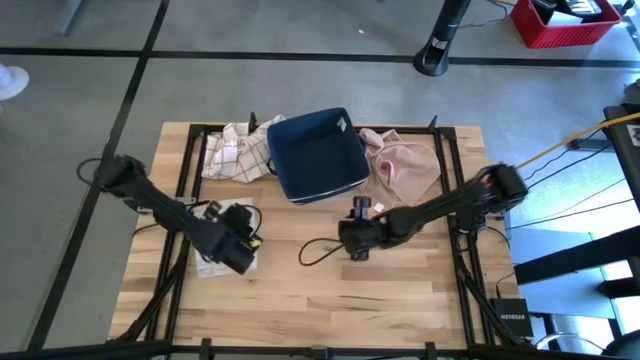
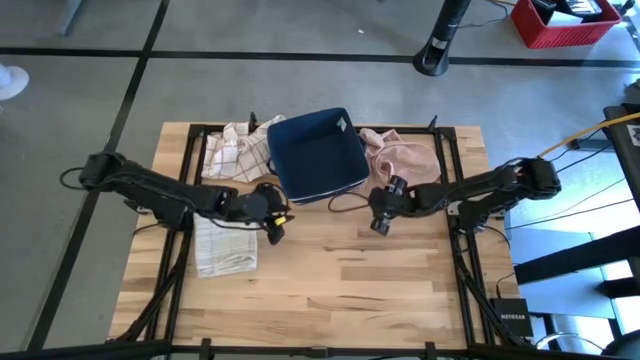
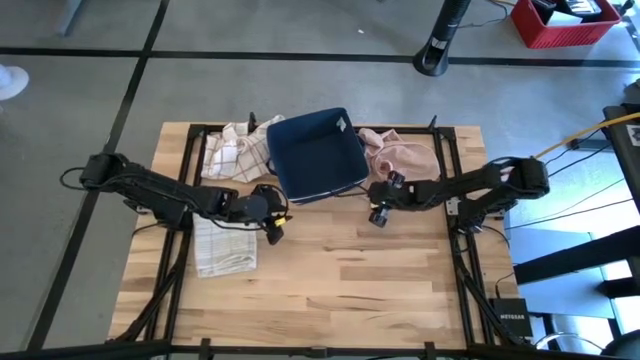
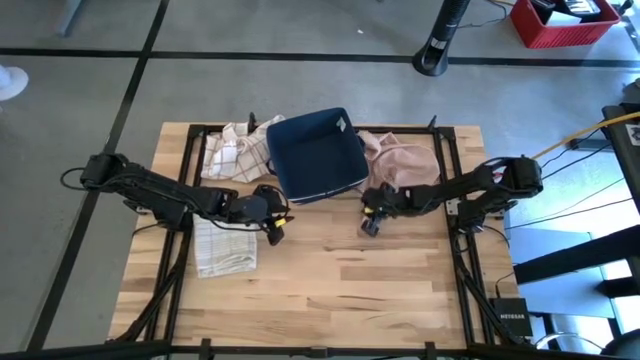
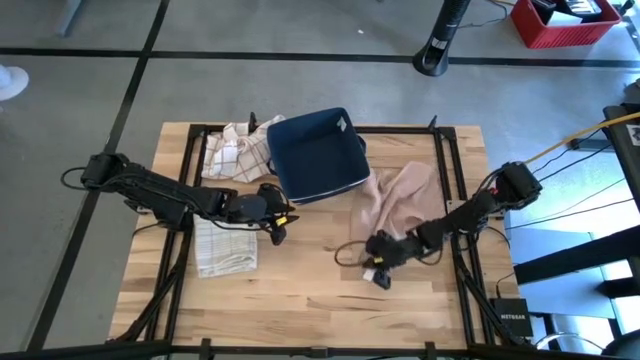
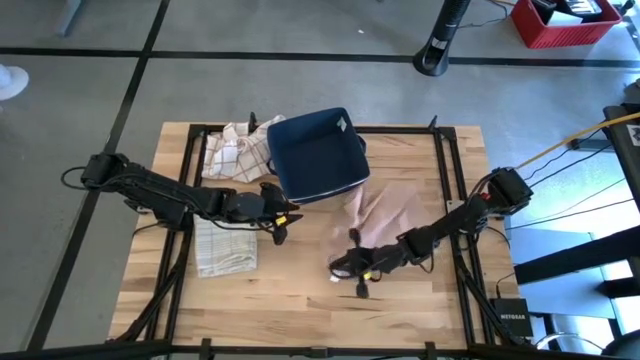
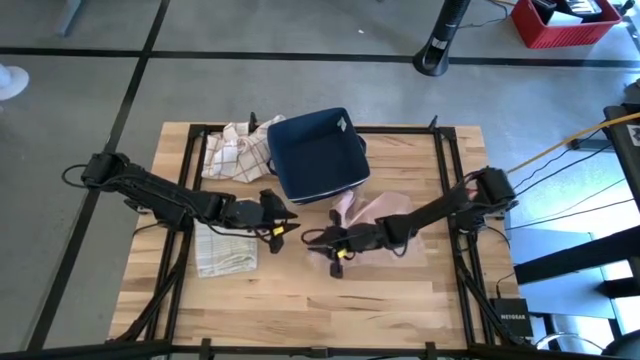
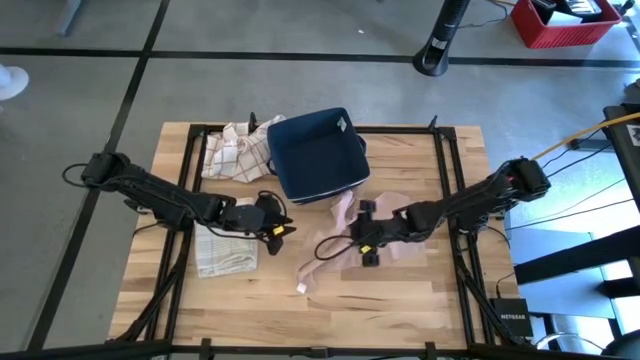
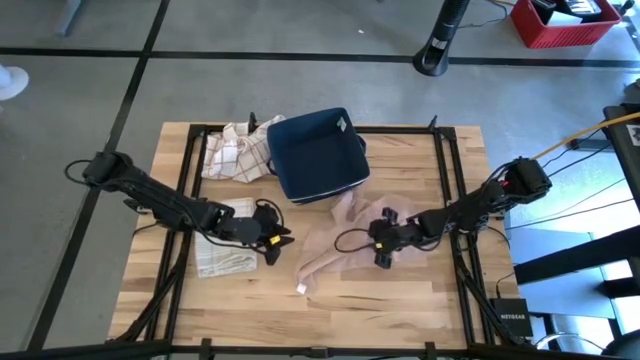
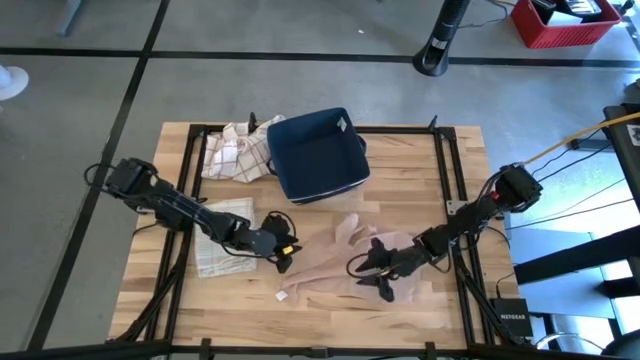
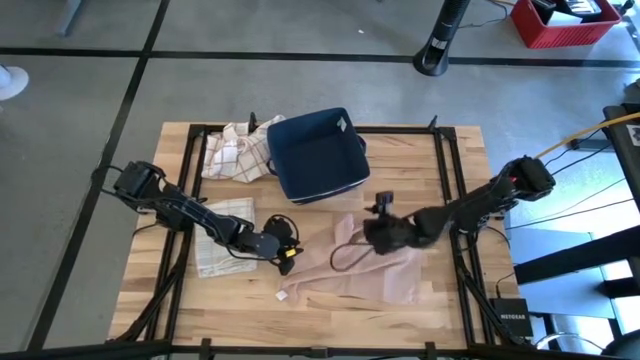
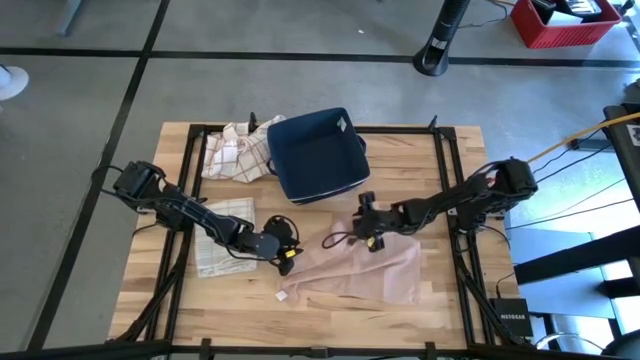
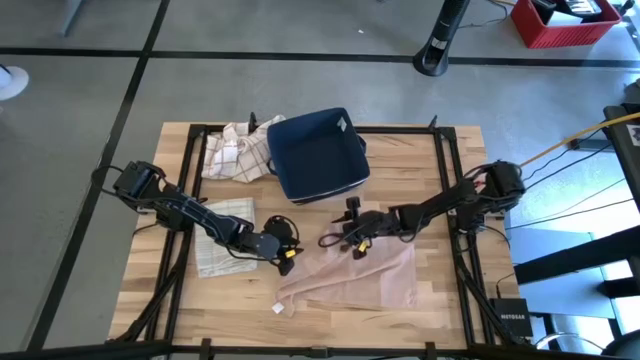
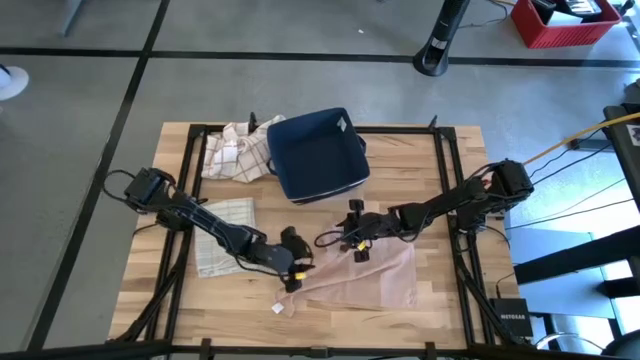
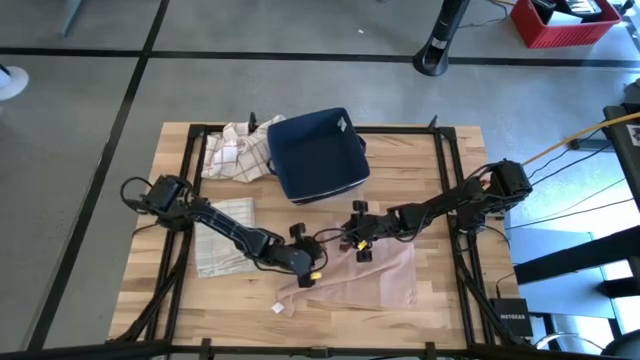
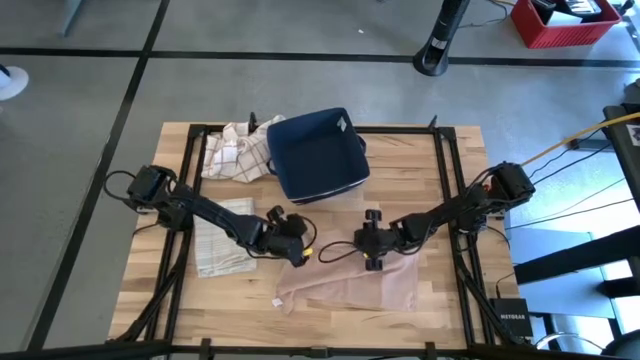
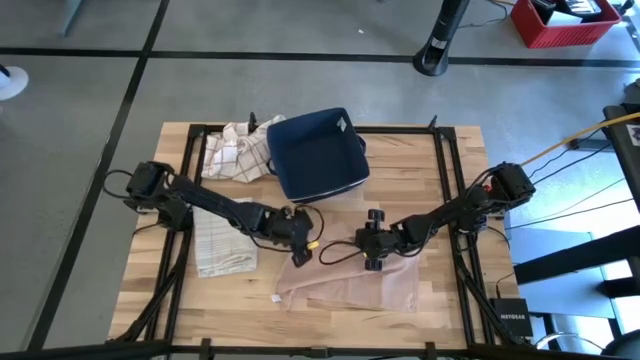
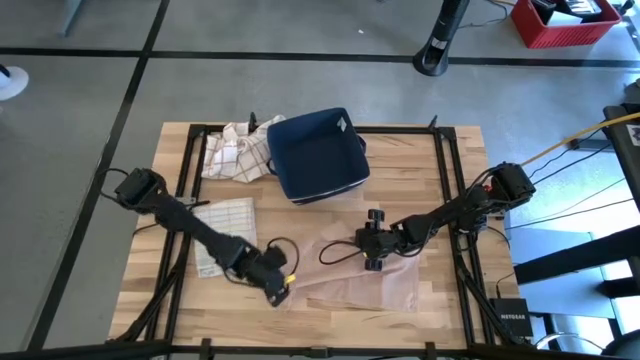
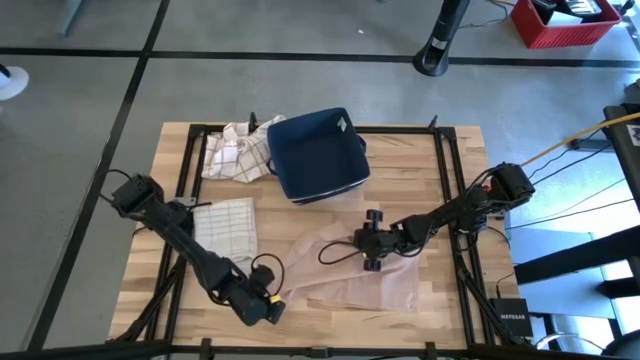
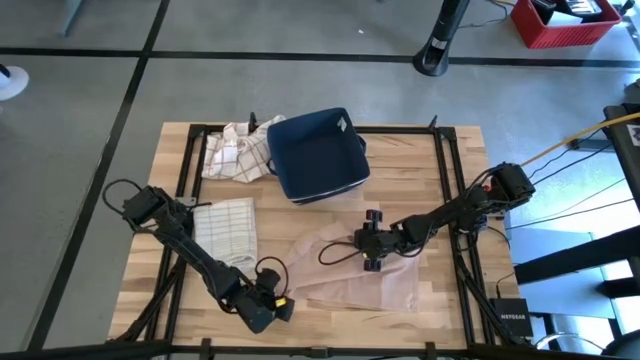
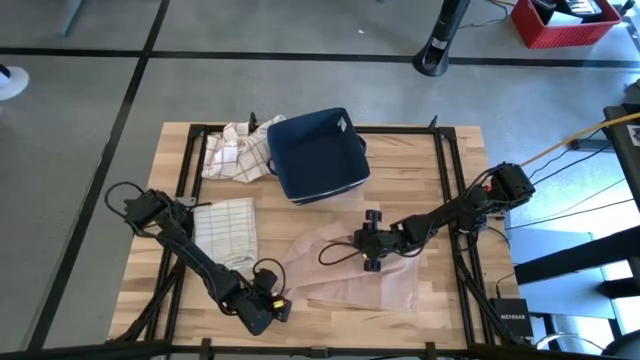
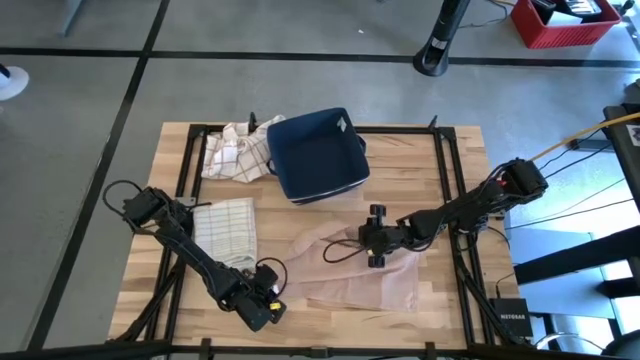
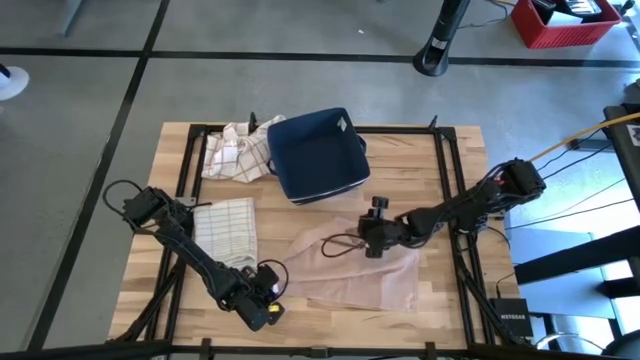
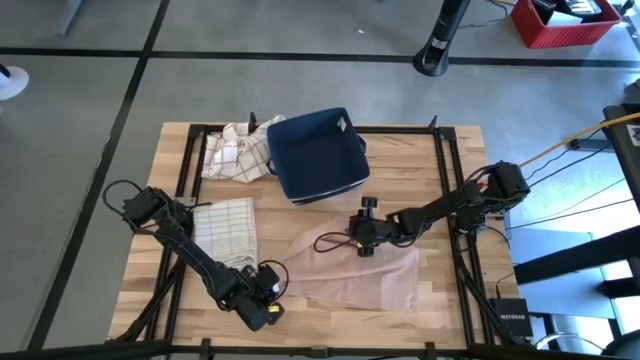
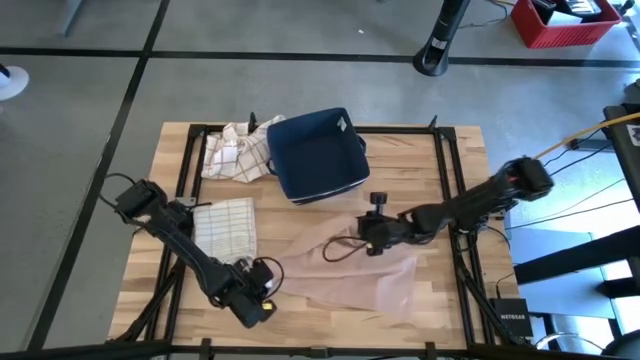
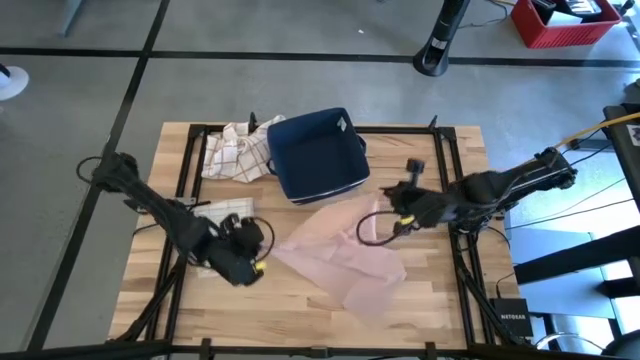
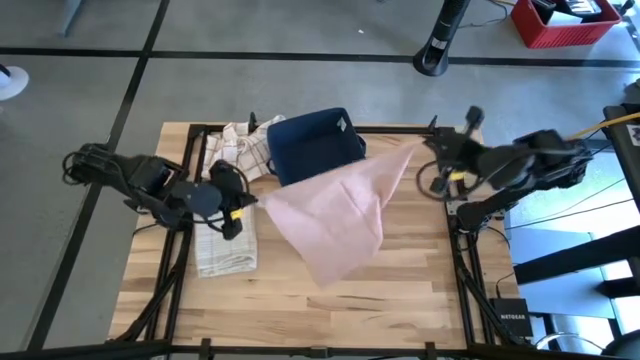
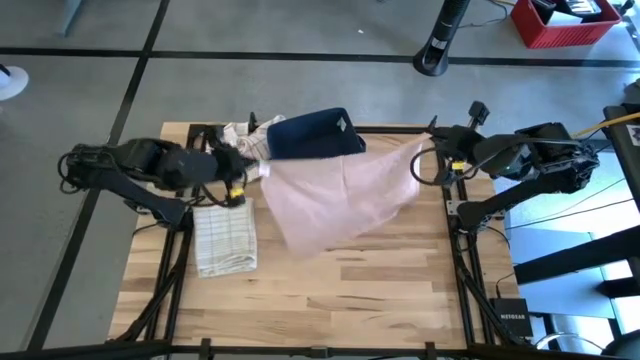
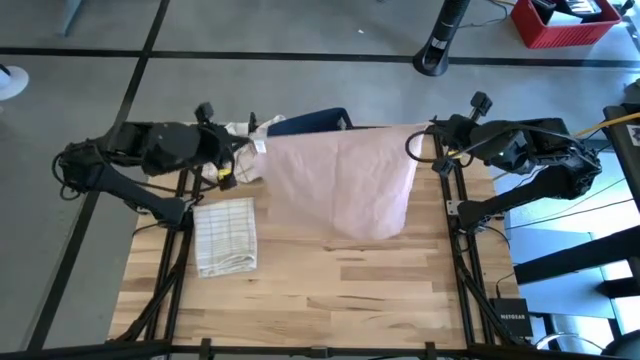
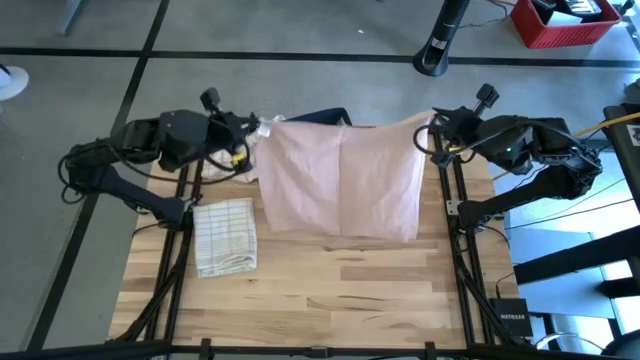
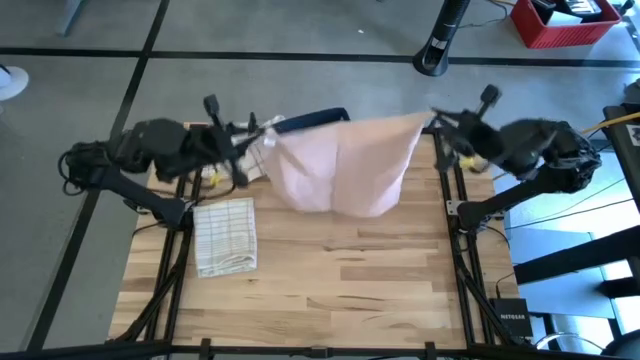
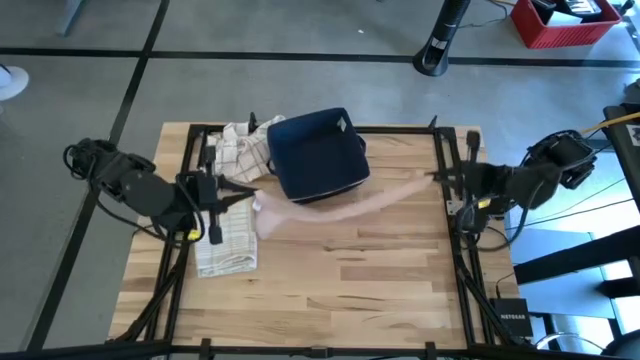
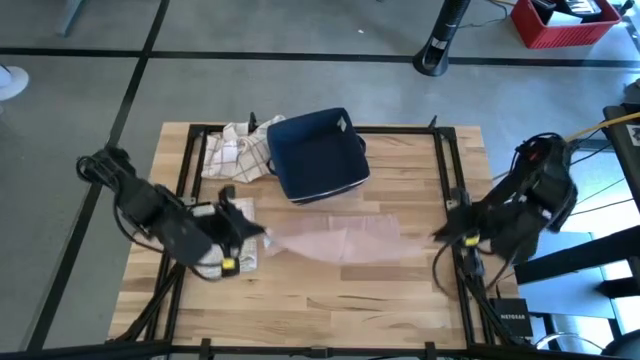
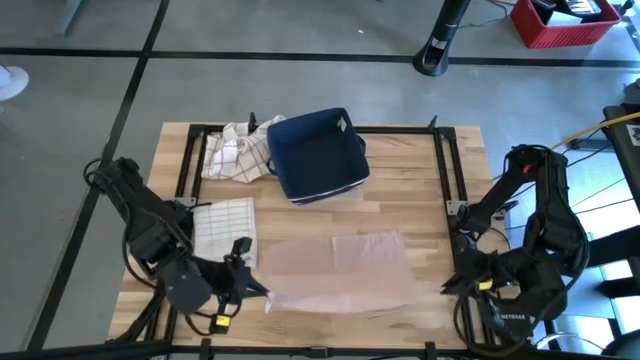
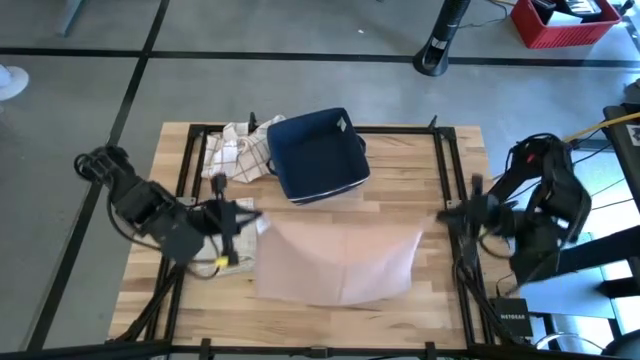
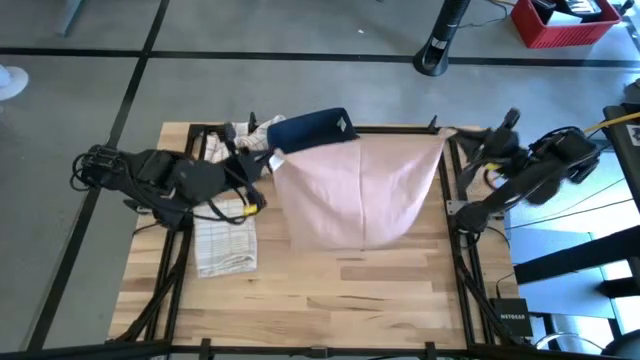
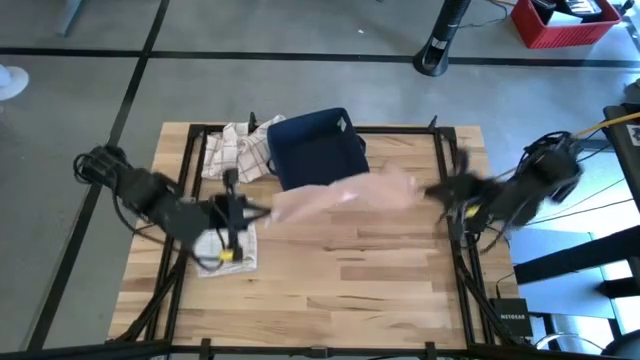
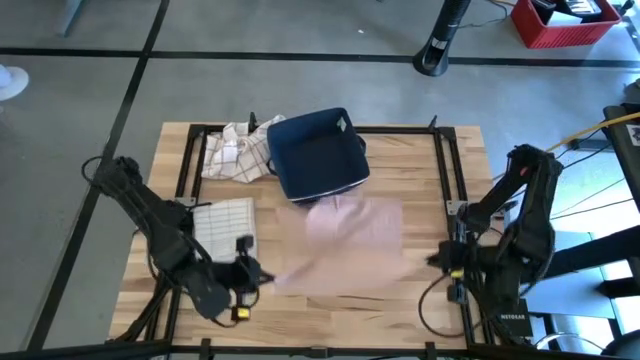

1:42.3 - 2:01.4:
Task: Fold towel
Fold the pink towel on the table
